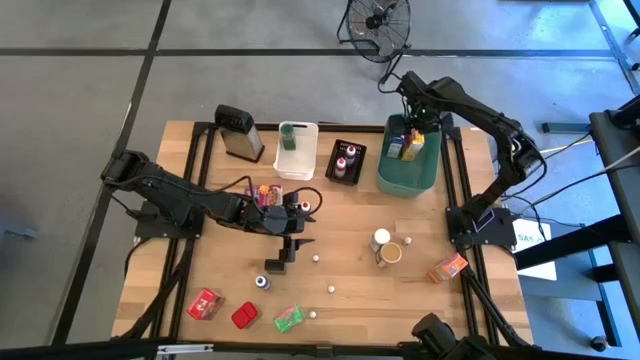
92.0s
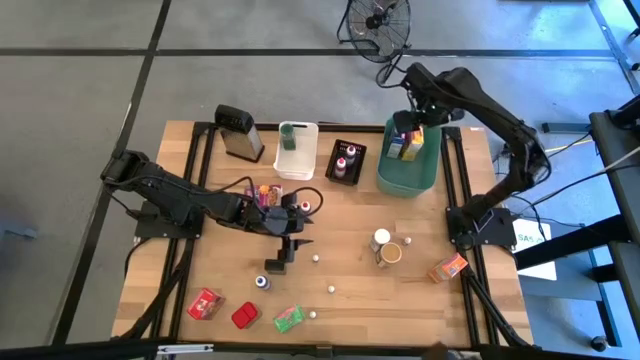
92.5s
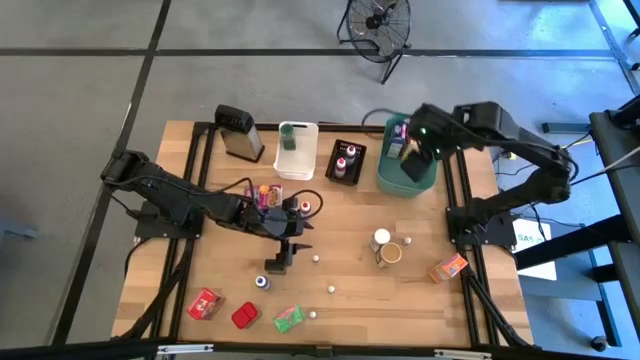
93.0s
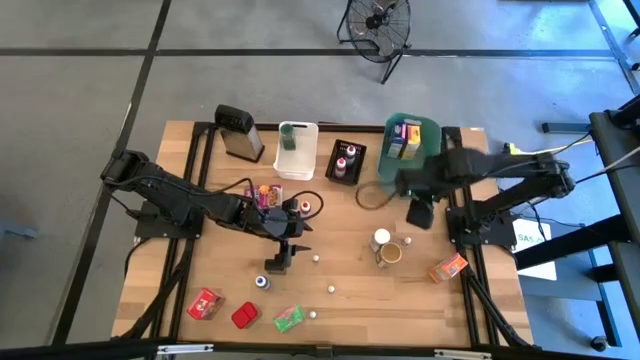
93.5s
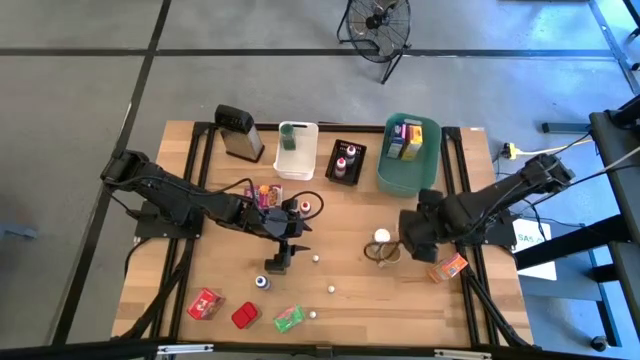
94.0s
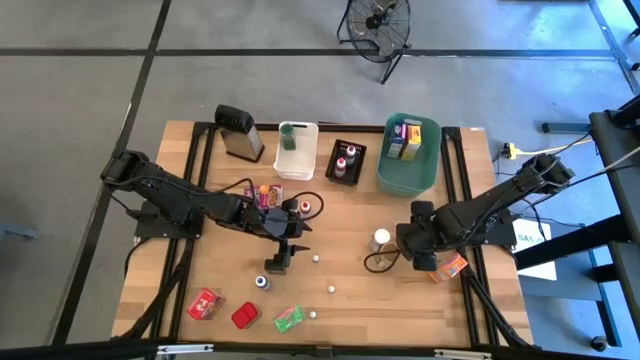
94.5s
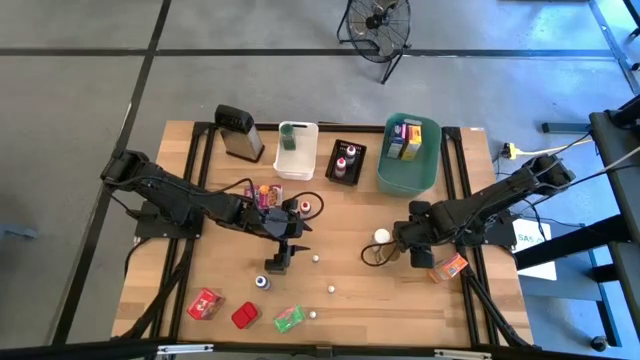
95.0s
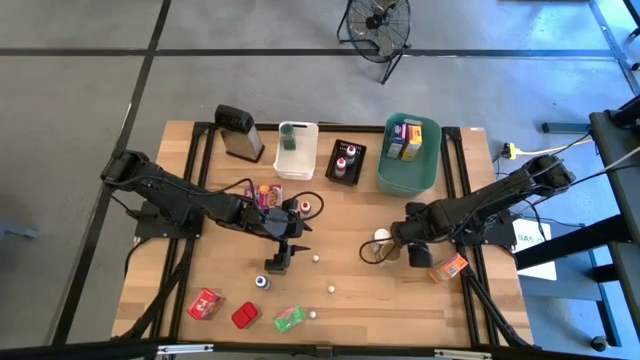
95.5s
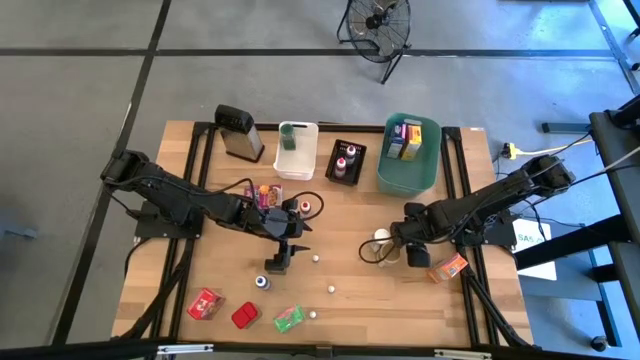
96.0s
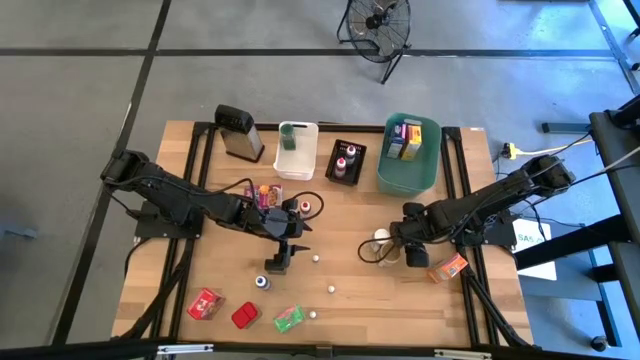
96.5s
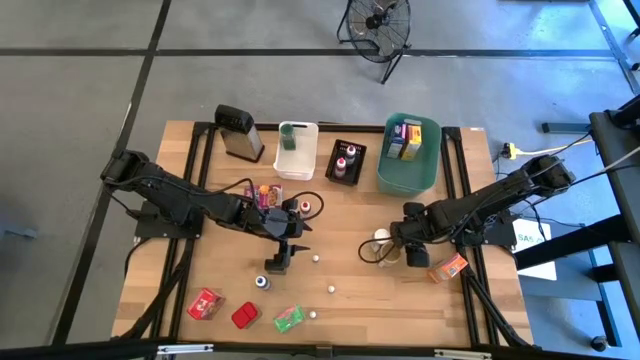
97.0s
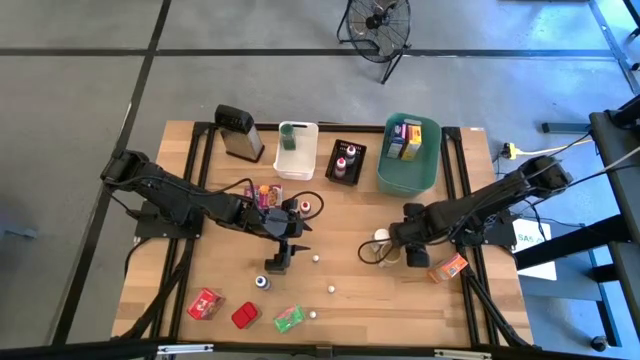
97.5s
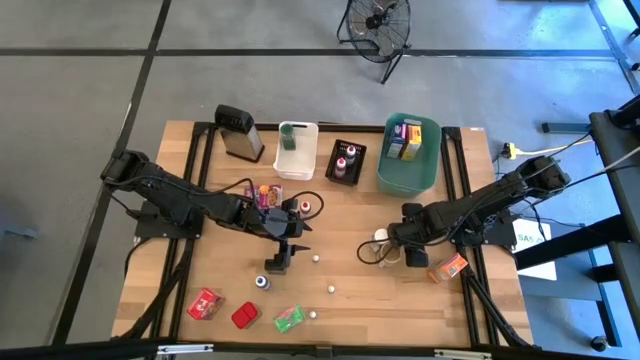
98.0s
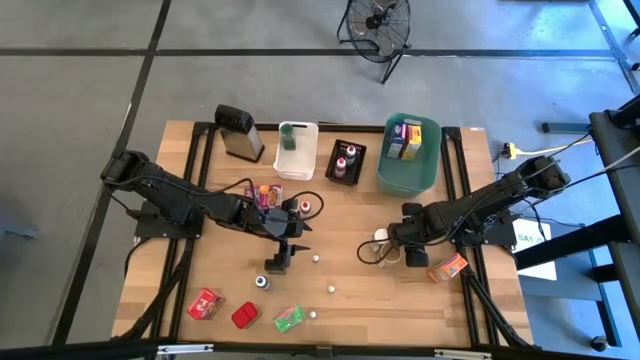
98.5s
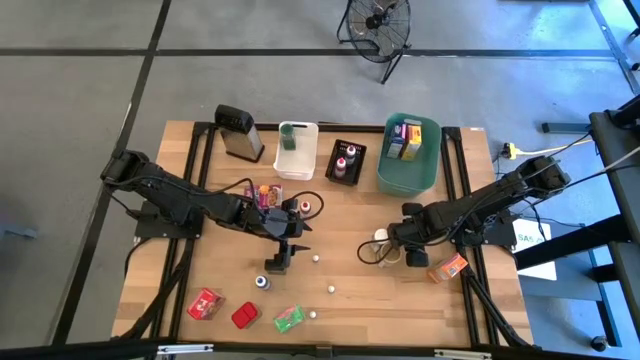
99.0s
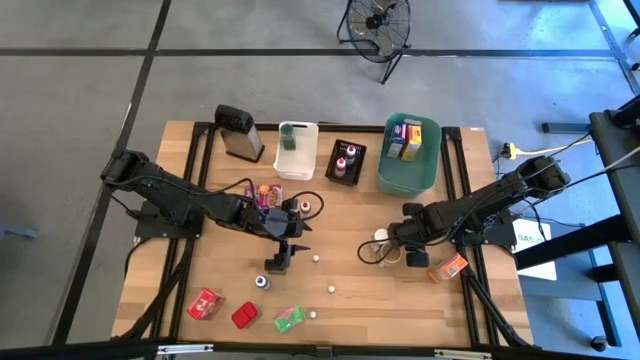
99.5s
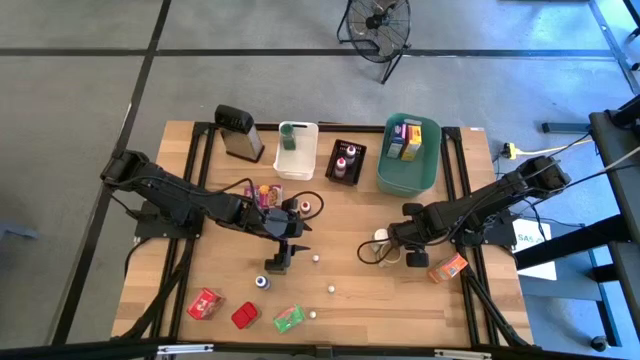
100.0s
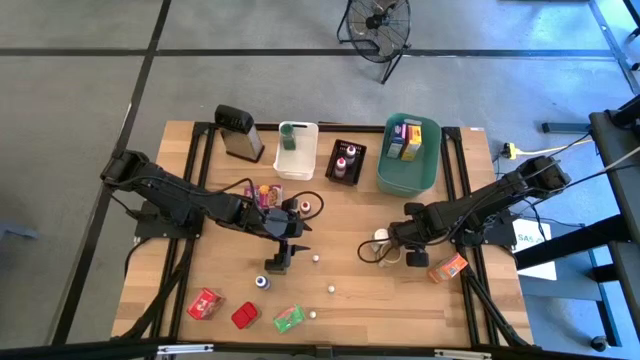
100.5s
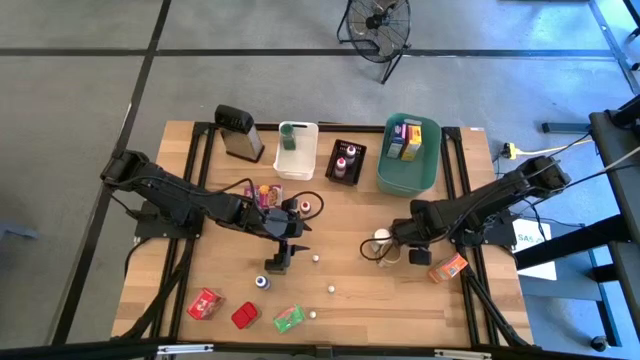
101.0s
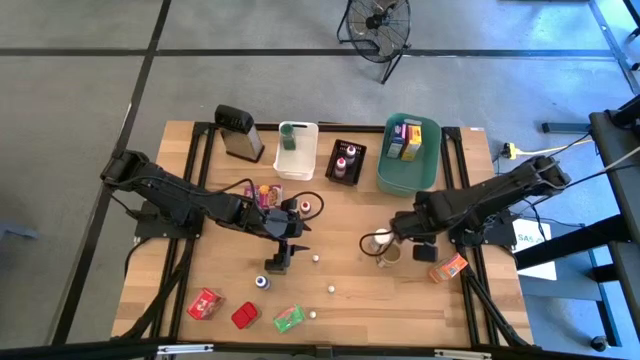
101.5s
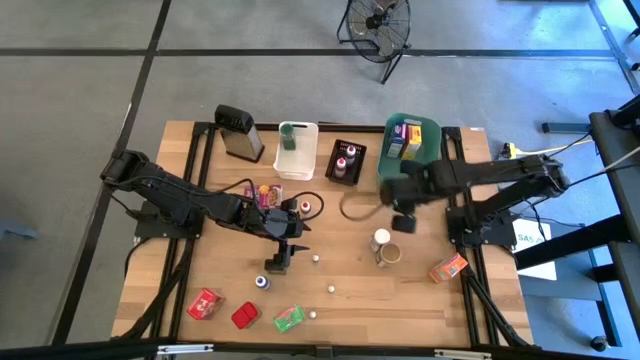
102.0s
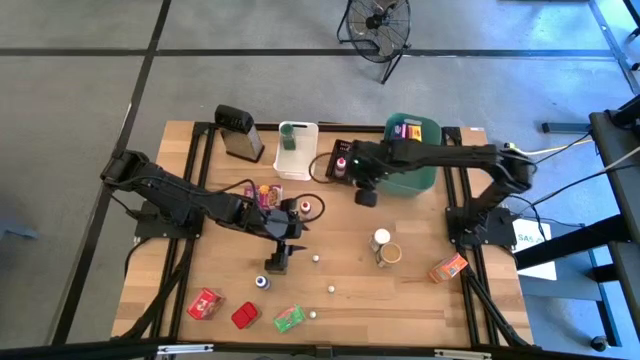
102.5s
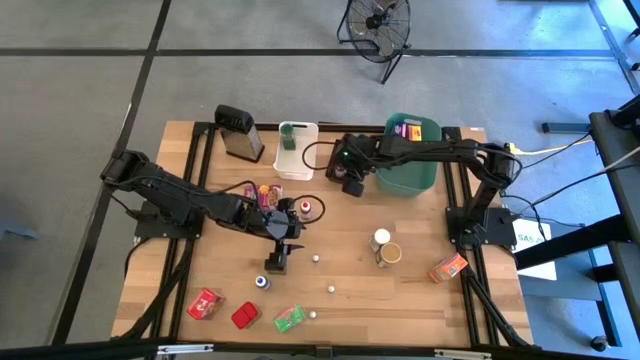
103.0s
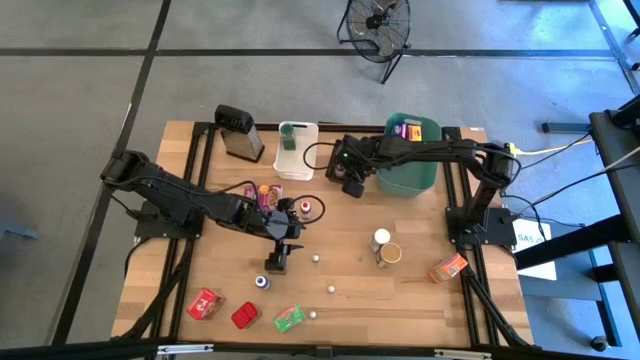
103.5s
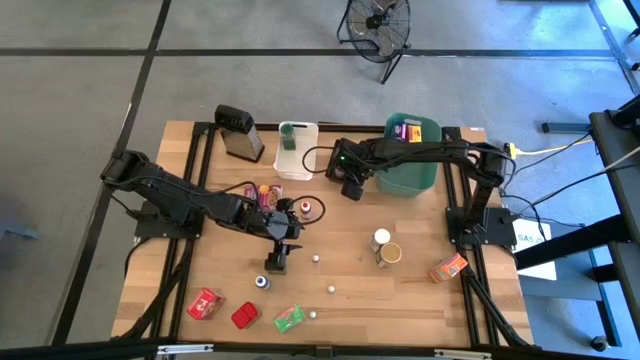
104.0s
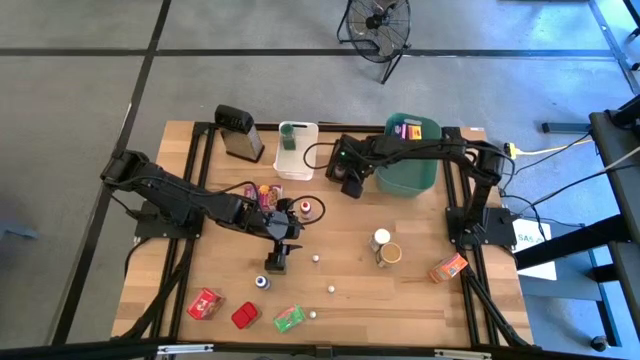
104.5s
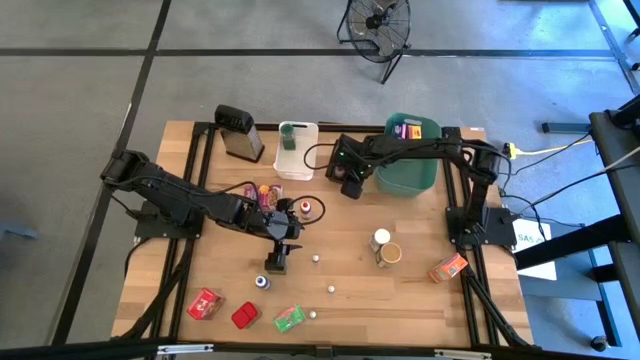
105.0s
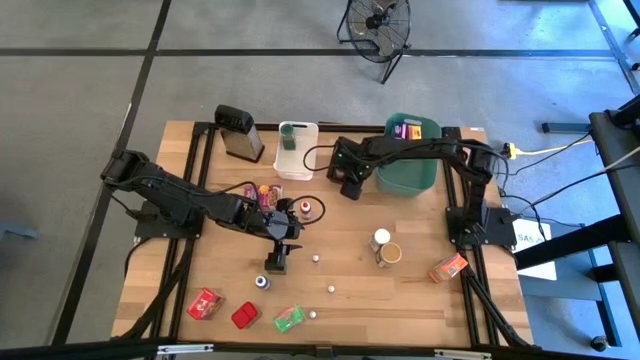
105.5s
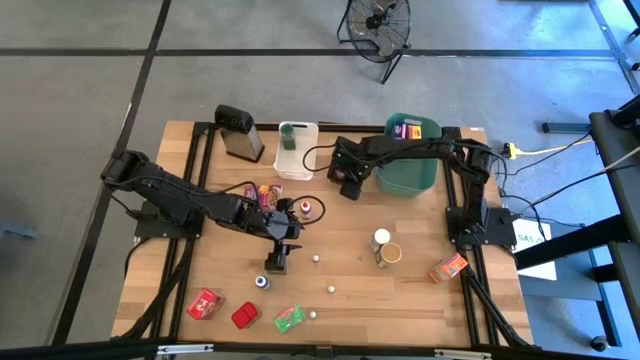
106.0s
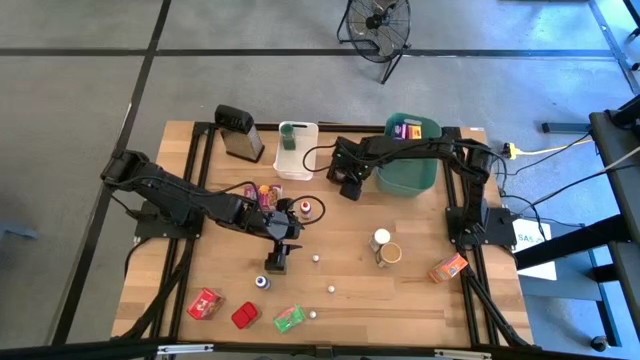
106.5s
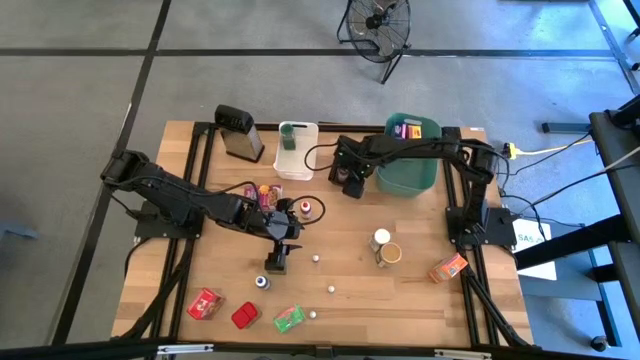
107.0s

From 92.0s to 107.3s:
Task: Pick & Place Kitchen Items
Put the small red food coloring bottle into the black bin

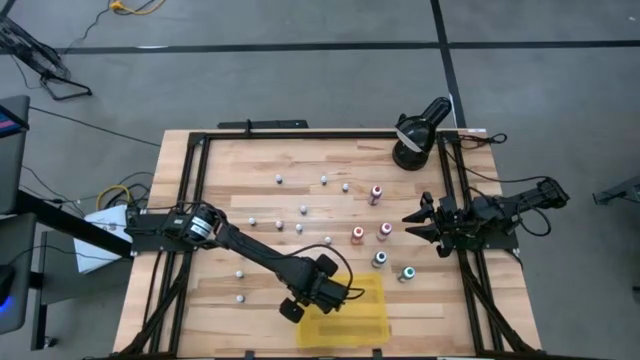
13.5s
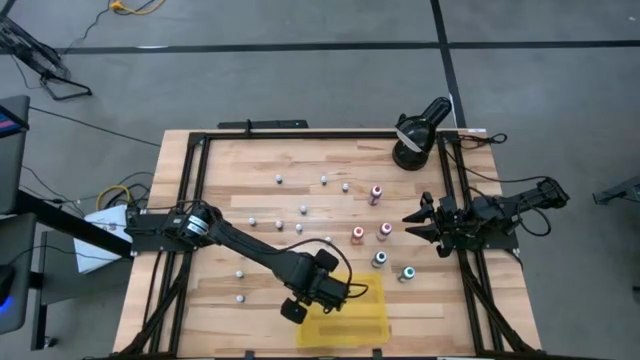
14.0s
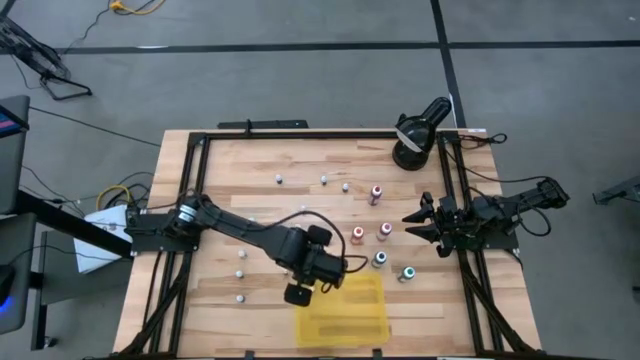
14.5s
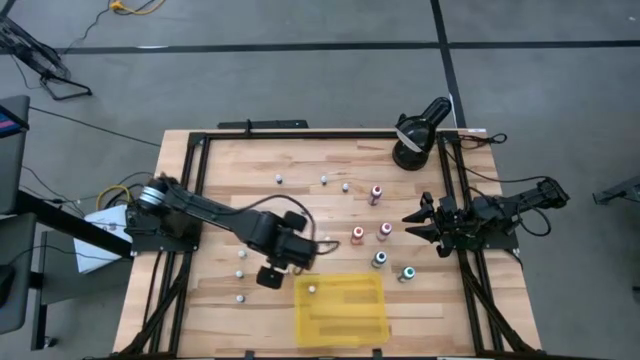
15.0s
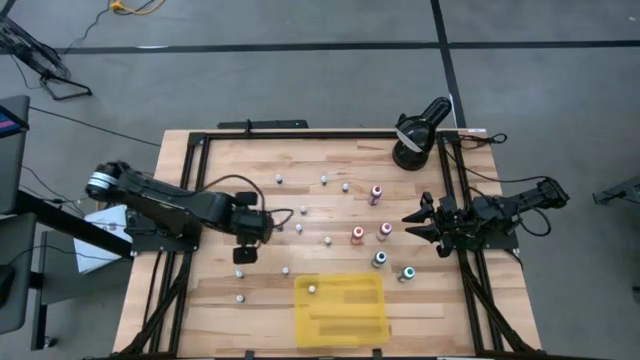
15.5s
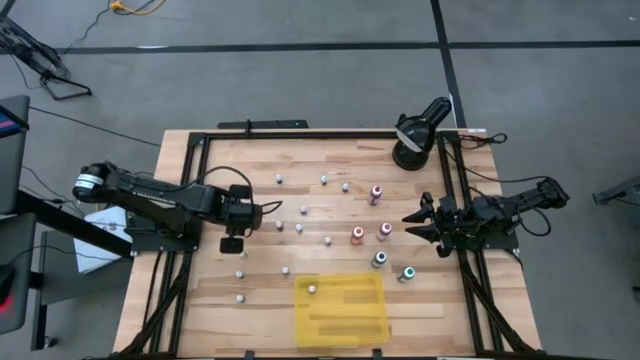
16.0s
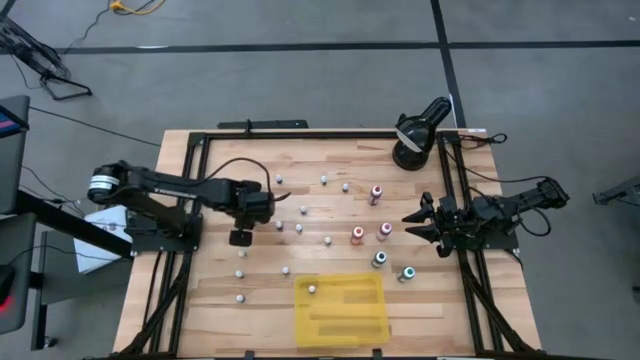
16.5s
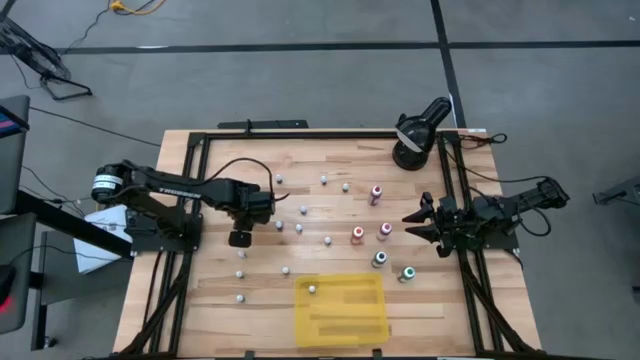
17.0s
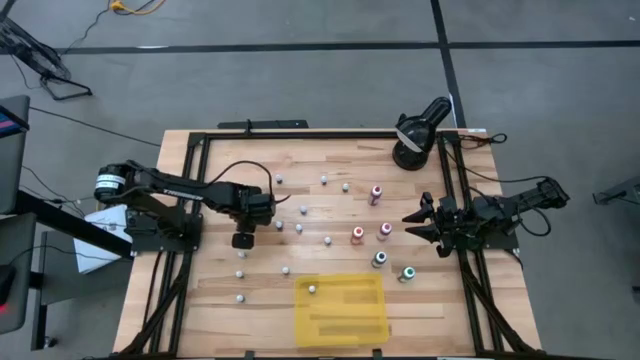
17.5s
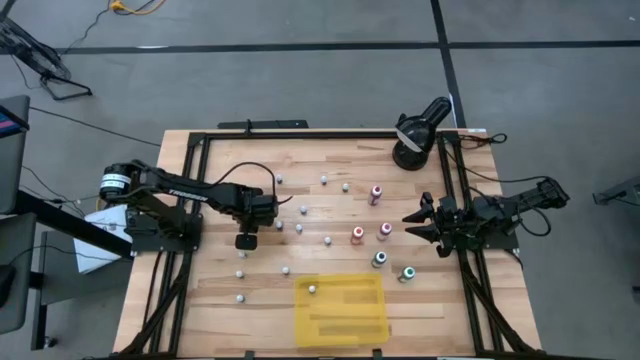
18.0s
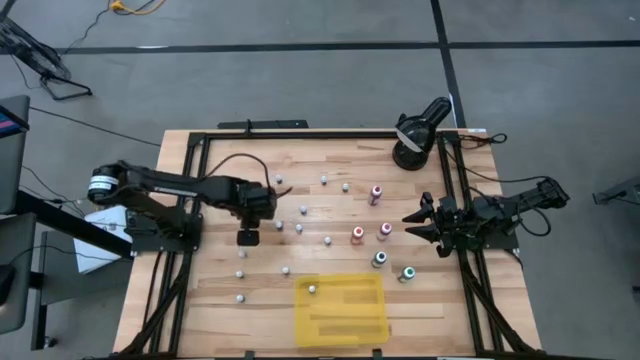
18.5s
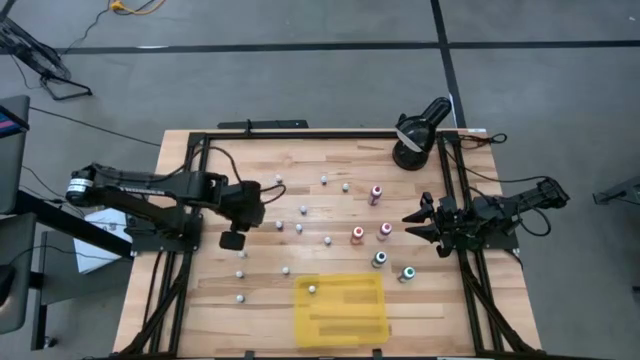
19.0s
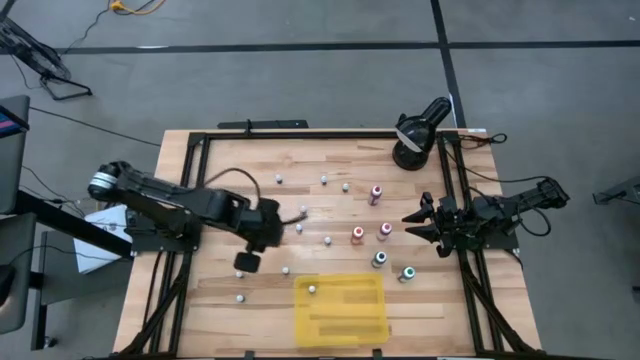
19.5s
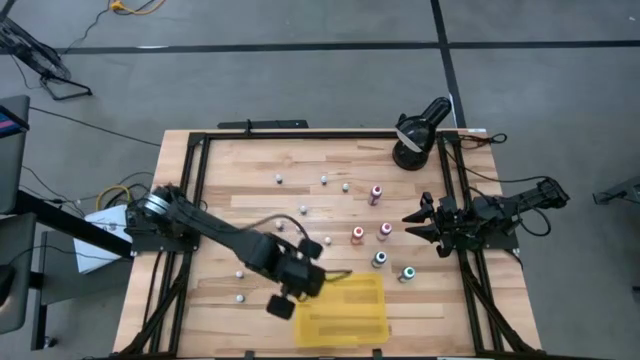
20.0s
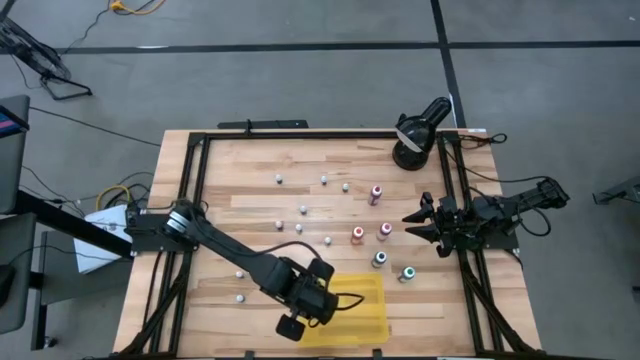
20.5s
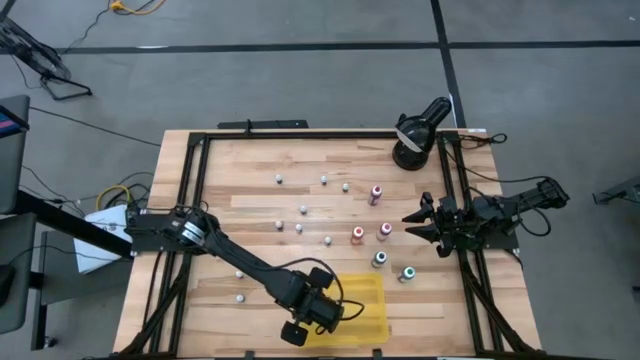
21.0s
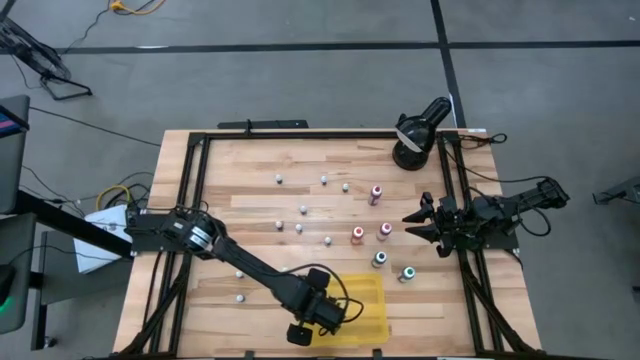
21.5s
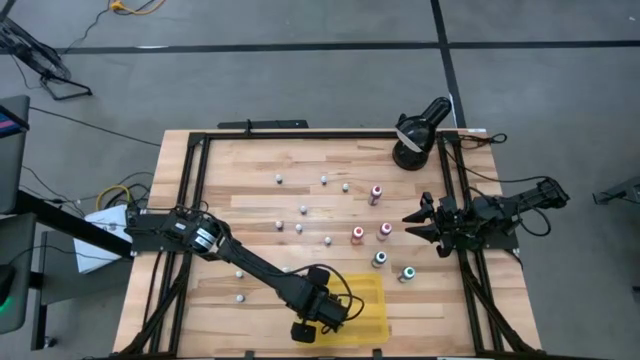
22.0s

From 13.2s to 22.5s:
Task: Pick & Place food coloring
Put the small light green food coloring bottle in the yellow bin
